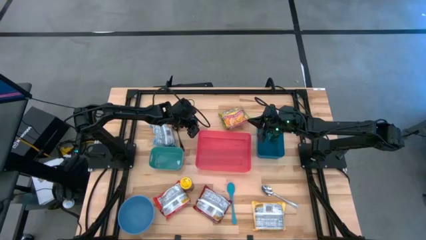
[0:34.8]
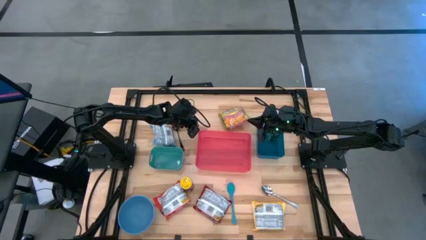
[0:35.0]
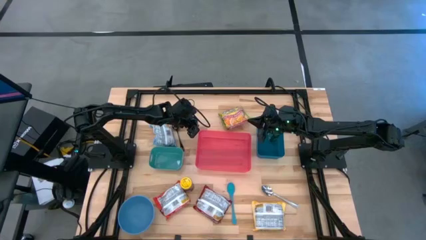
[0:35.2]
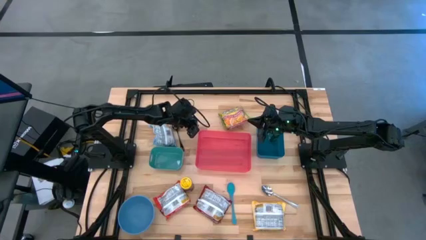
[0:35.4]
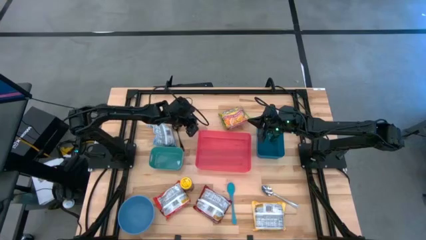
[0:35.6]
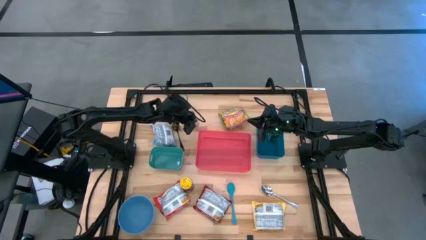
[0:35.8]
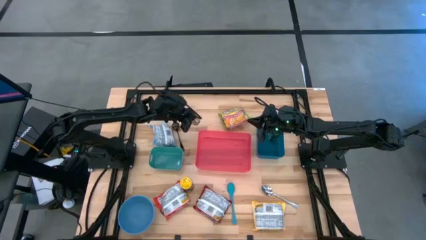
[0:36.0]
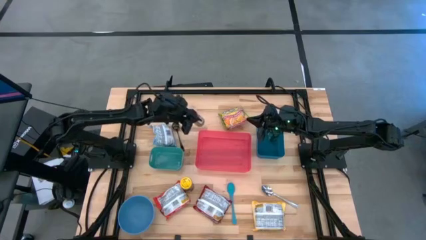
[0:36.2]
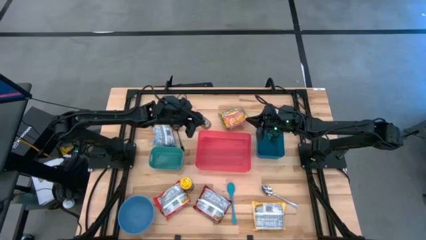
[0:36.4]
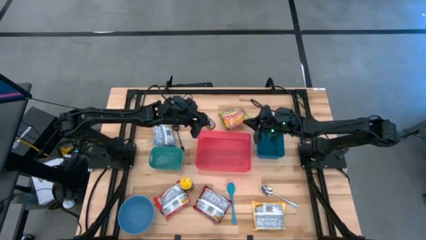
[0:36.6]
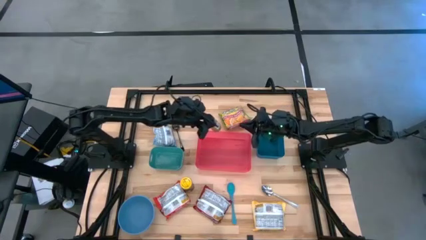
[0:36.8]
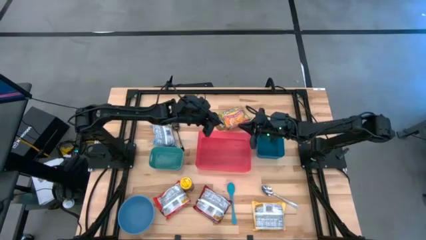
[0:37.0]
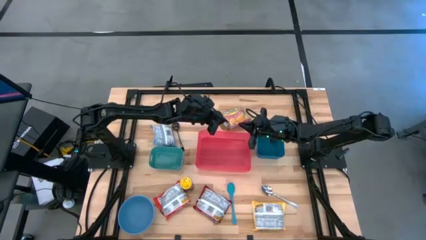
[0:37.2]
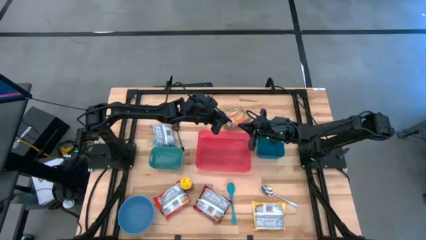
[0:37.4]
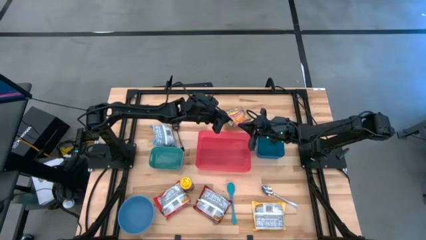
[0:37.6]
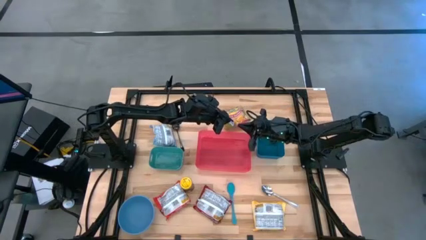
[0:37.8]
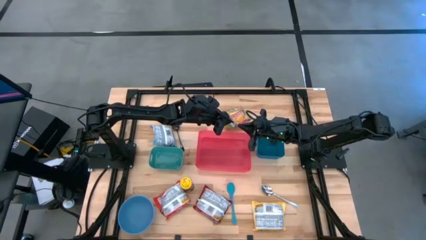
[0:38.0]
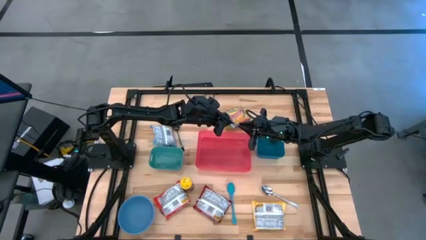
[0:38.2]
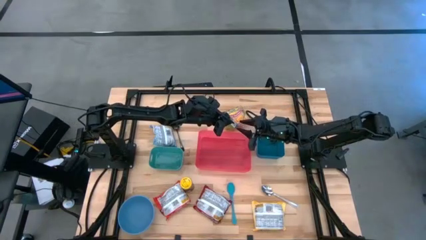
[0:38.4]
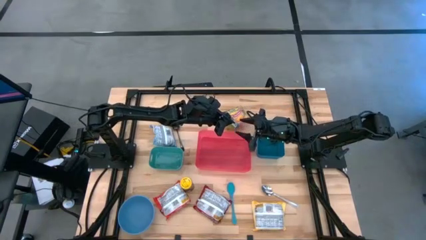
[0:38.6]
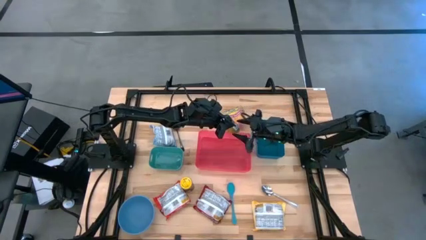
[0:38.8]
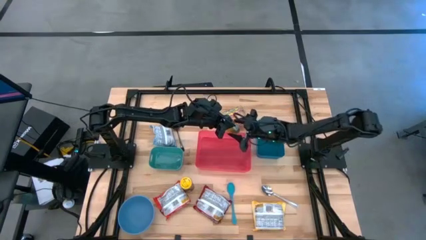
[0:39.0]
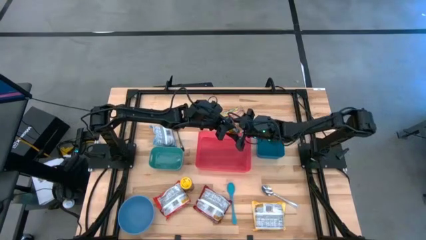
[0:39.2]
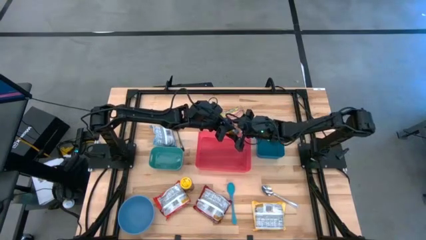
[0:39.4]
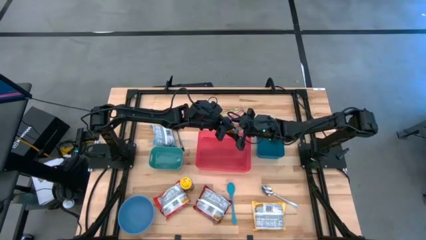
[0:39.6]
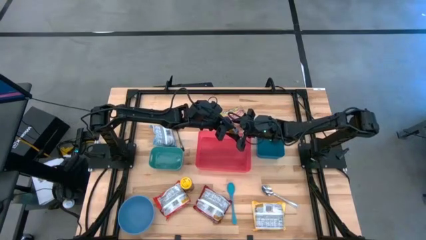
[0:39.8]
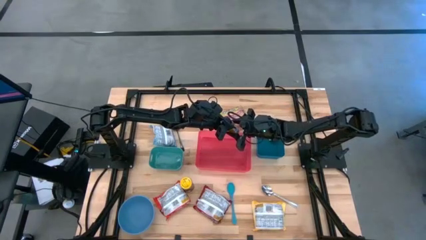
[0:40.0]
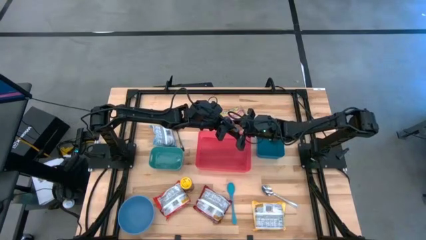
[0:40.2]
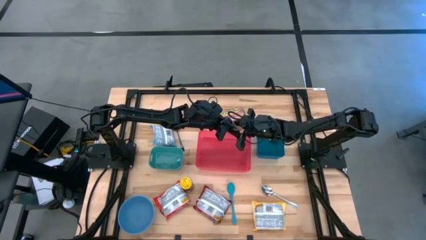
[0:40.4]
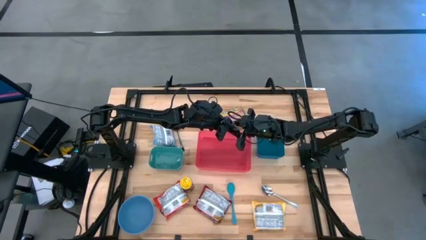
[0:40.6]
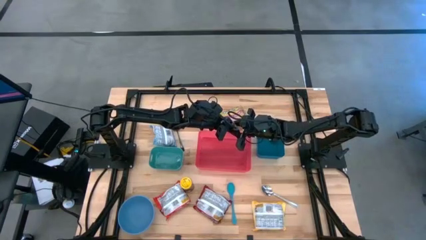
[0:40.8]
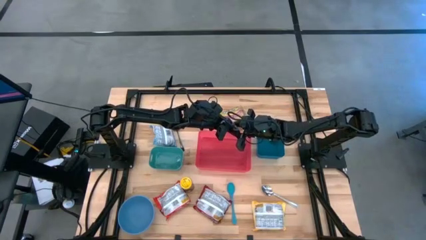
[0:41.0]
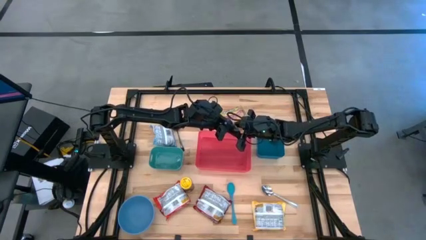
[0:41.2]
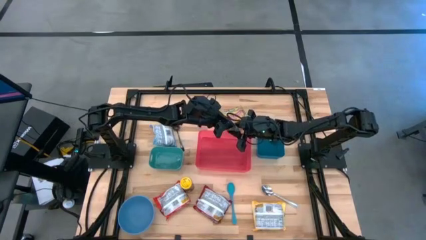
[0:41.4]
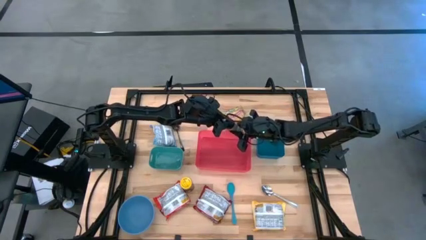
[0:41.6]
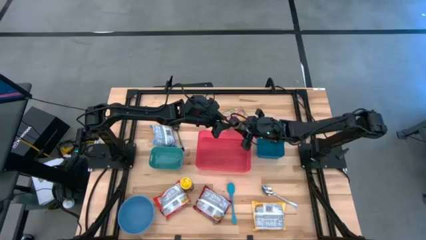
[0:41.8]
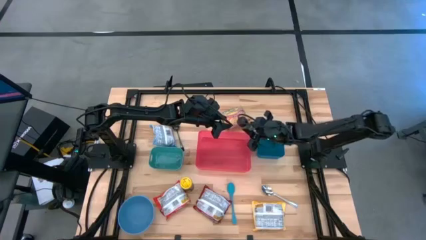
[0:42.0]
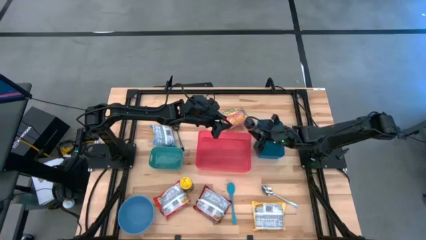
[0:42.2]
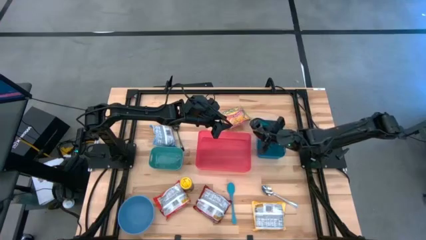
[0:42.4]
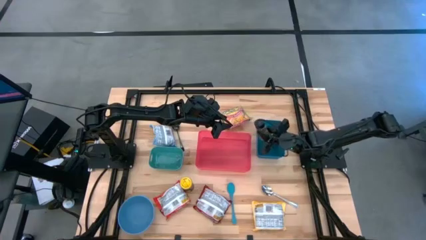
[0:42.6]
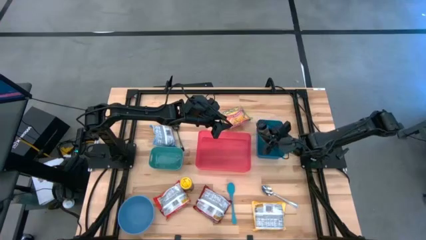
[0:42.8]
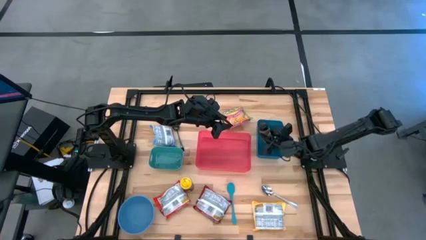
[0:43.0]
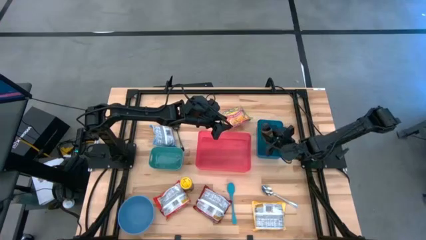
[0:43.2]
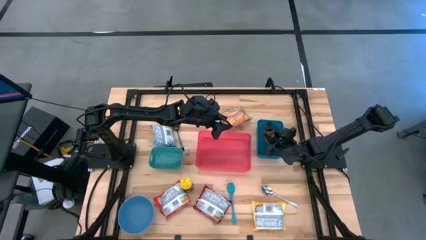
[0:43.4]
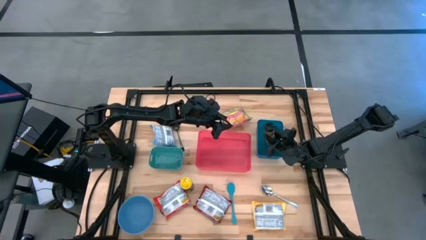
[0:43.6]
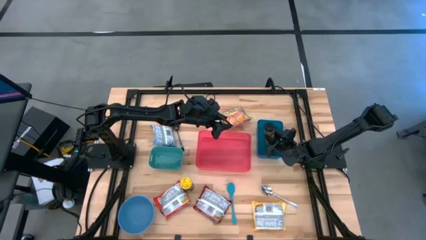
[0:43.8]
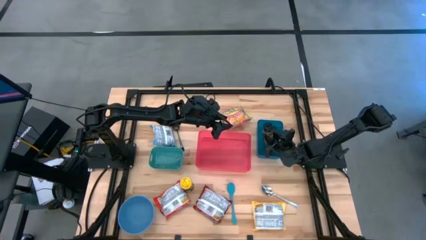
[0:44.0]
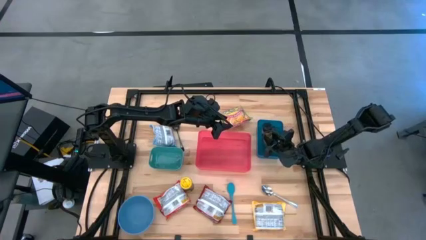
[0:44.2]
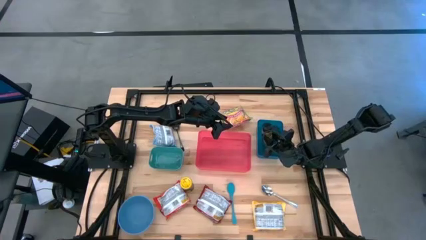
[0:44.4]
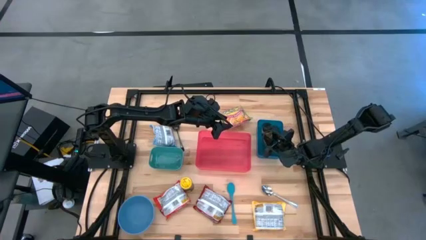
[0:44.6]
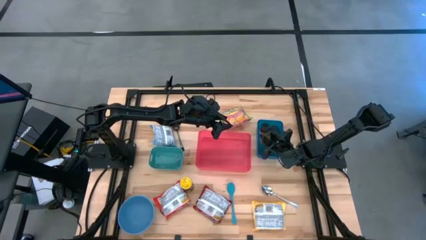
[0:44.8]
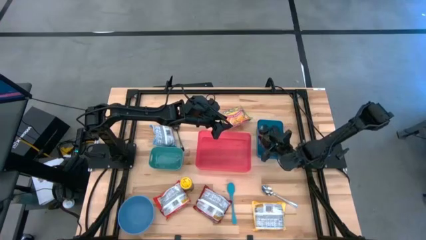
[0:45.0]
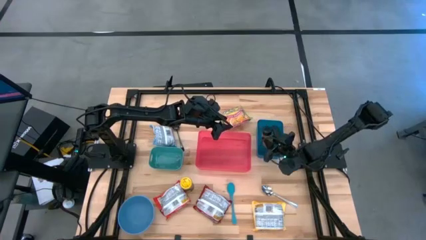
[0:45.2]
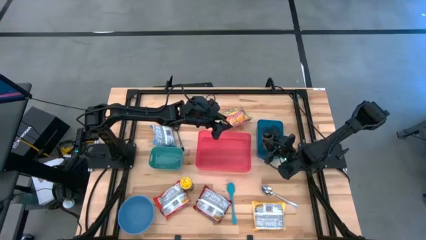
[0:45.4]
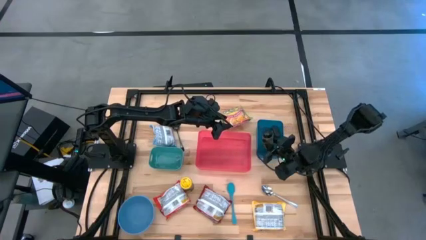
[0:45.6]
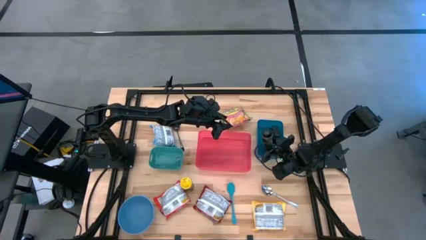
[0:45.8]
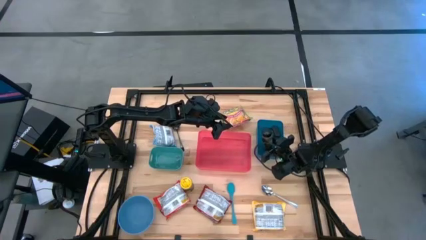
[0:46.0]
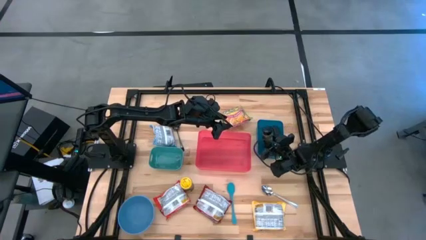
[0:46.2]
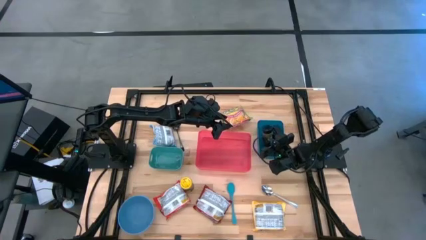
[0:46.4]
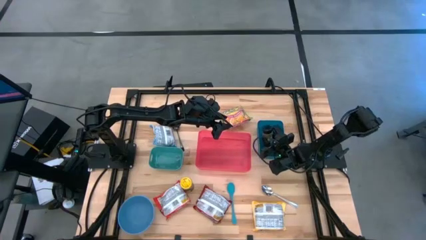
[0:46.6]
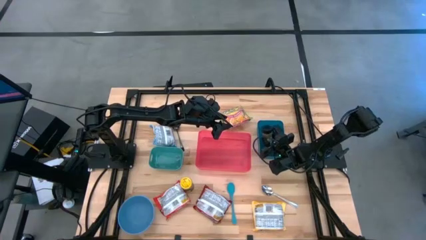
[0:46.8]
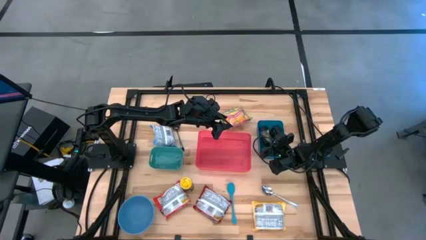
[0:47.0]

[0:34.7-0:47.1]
Task: Pick & Place Food Item
Put the black seasoning bottle into the blue bin

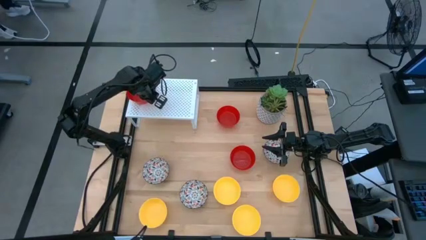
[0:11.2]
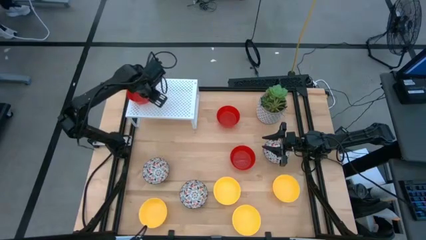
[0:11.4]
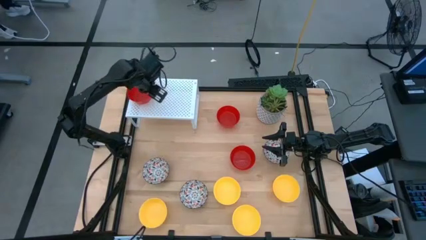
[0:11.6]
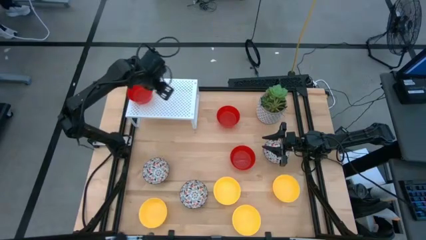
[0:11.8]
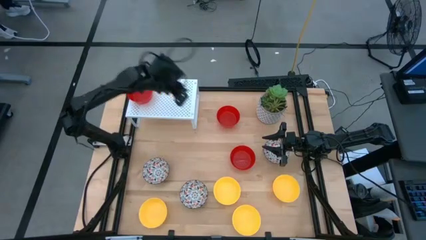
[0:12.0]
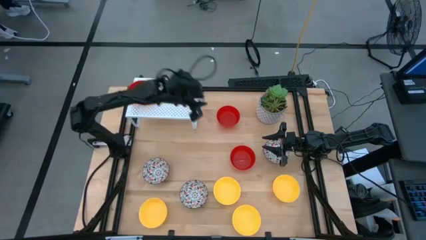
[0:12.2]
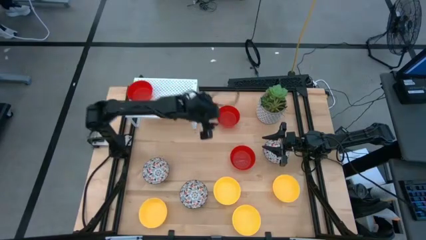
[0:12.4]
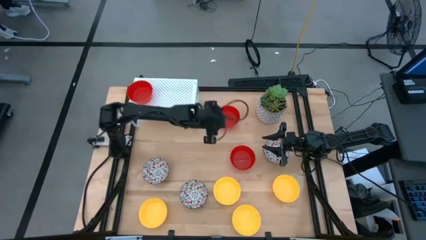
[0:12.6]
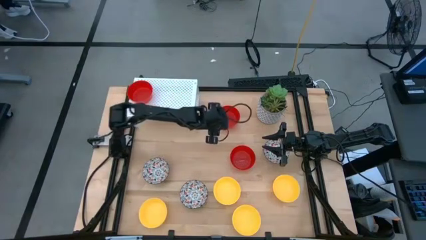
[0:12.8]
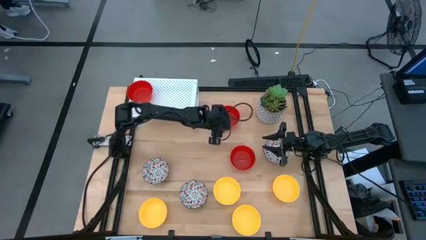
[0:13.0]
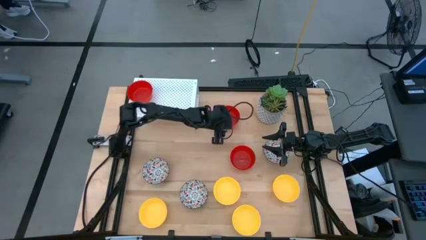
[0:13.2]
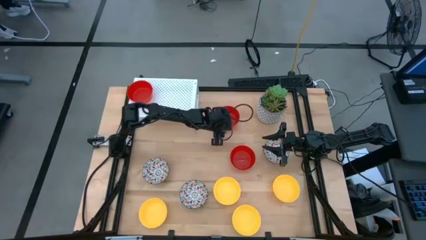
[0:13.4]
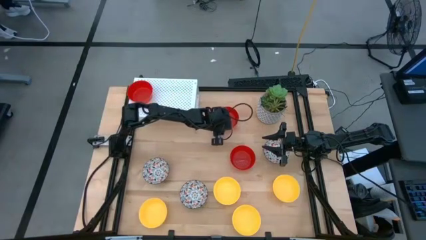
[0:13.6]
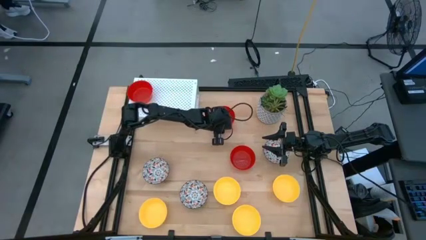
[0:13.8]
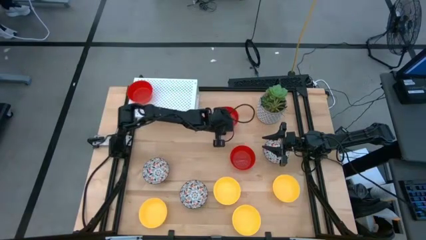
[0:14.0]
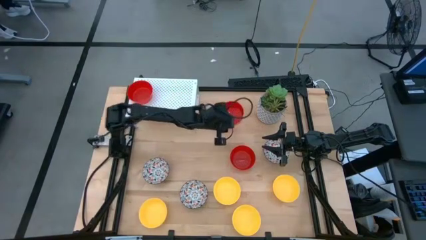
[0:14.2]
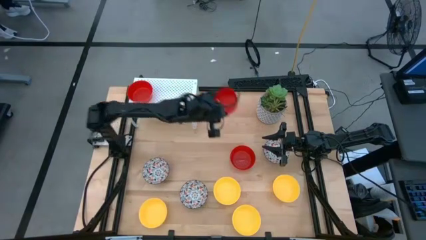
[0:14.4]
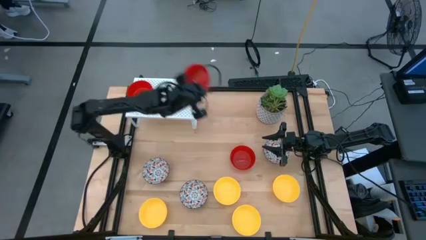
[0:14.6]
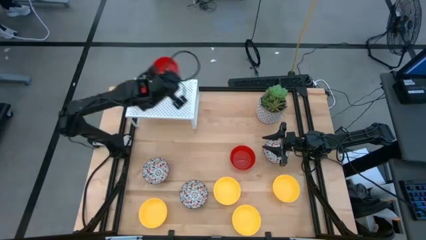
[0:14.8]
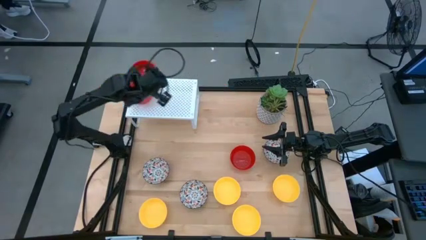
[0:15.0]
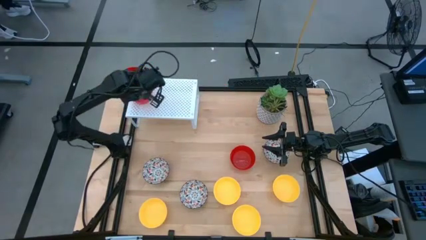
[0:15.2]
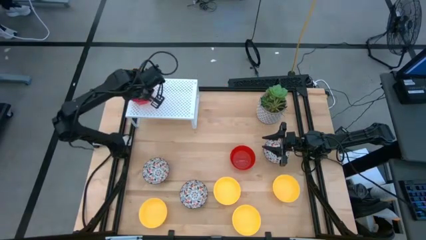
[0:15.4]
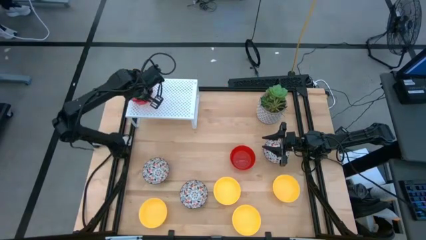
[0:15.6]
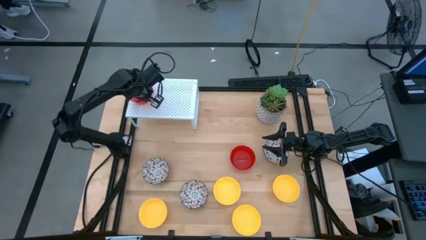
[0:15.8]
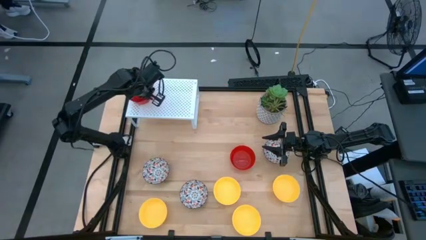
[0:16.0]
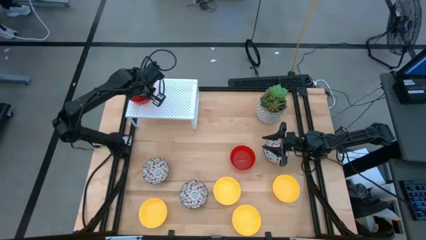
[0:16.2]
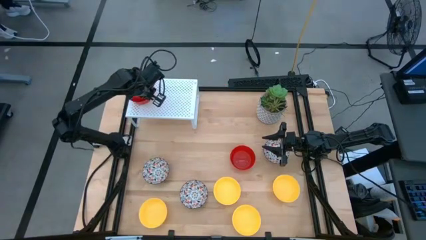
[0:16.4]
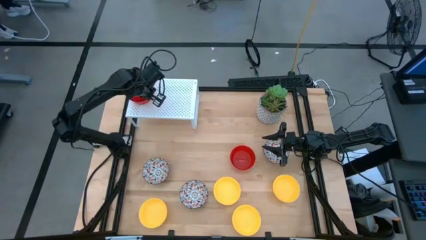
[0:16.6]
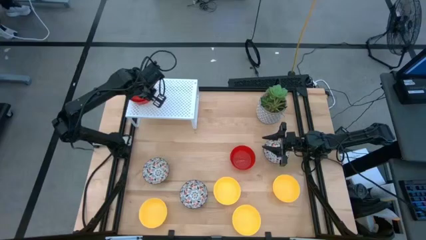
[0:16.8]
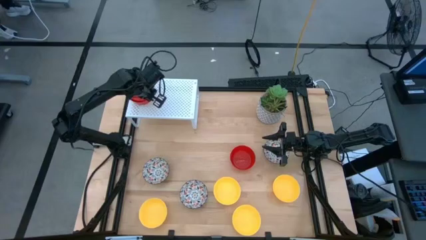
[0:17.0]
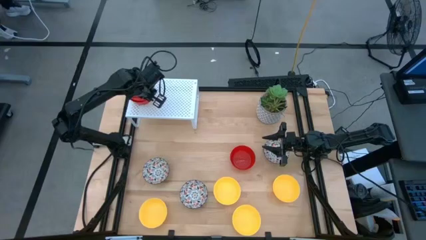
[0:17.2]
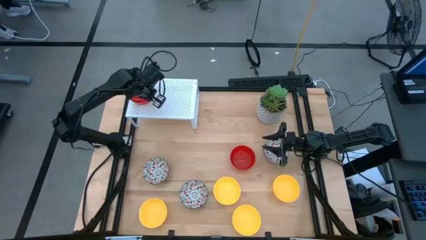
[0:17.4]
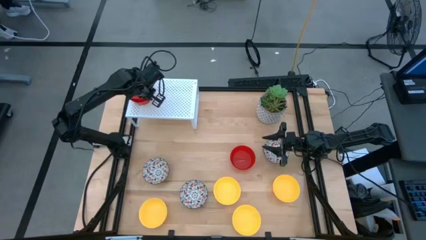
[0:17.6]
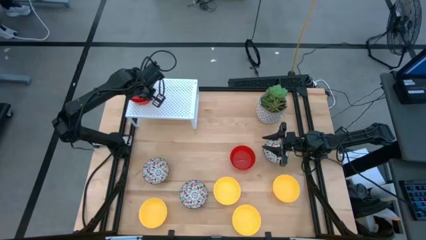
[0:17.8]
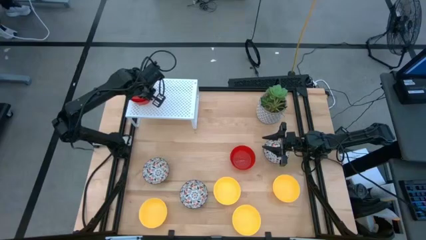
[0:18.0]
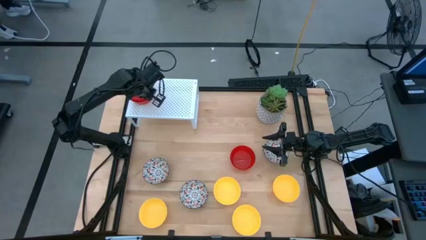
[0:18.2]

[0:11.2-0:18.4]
Task: Pick & Place Mini bowls
Stack the red bowl on top of the red bowl on the shelf
